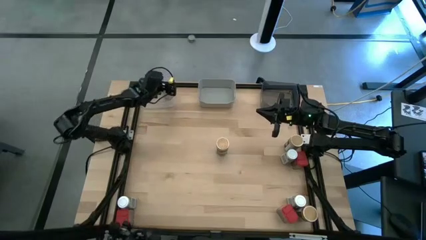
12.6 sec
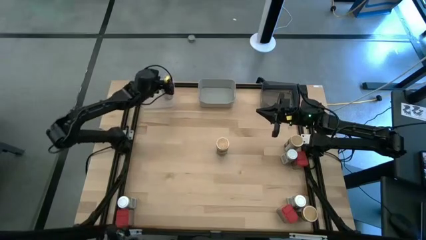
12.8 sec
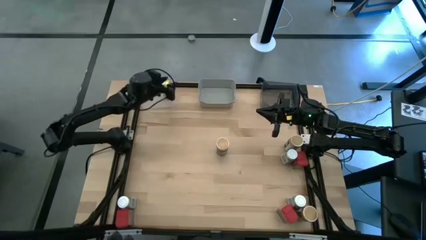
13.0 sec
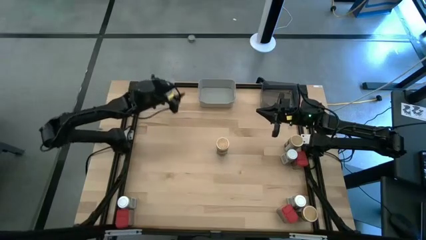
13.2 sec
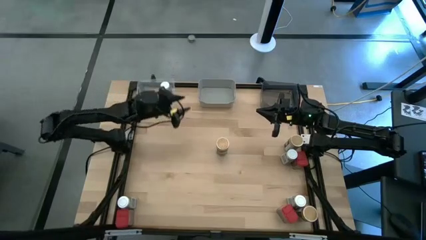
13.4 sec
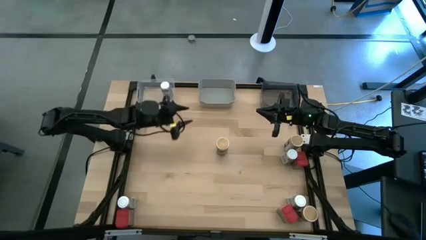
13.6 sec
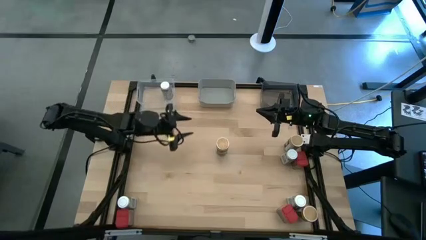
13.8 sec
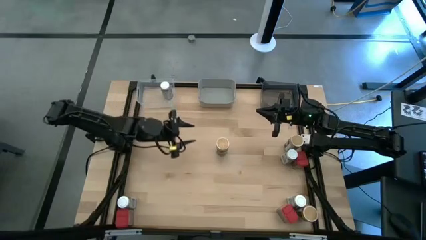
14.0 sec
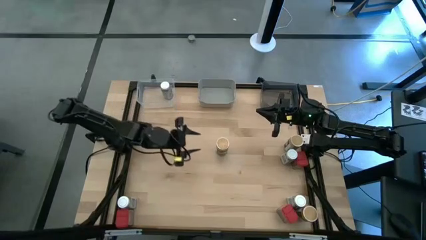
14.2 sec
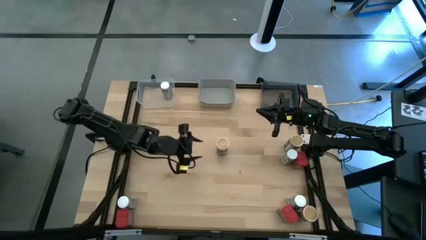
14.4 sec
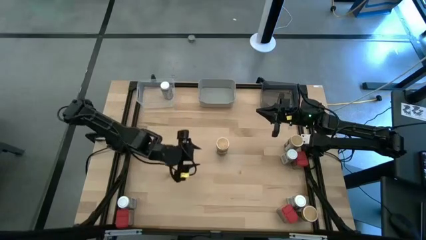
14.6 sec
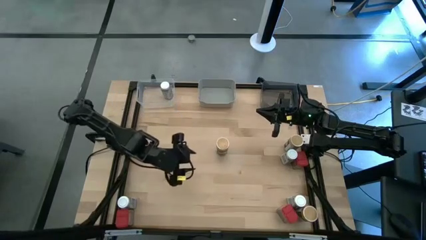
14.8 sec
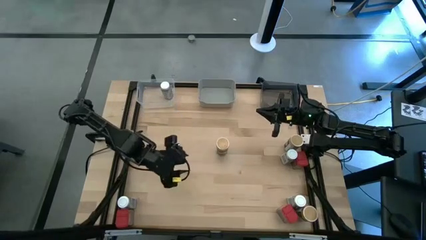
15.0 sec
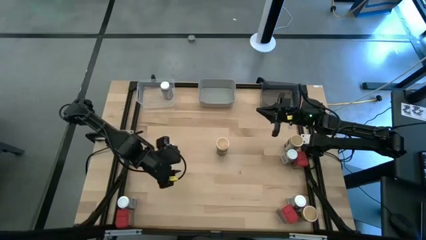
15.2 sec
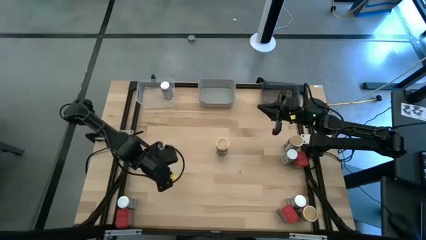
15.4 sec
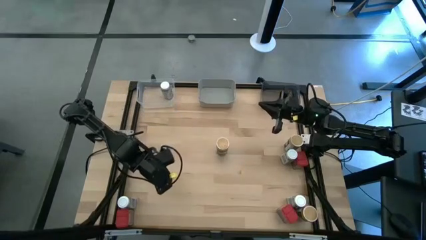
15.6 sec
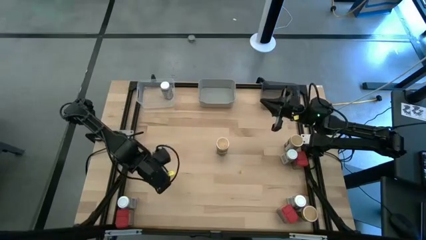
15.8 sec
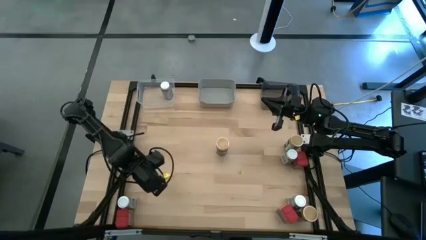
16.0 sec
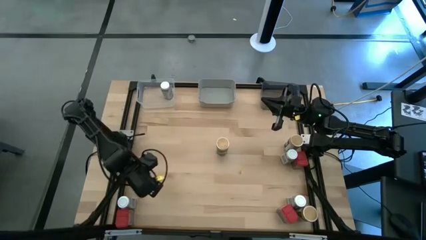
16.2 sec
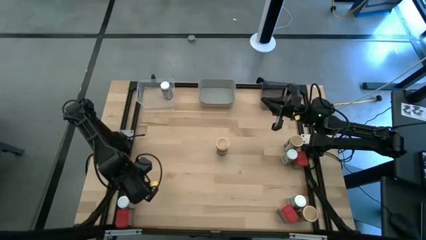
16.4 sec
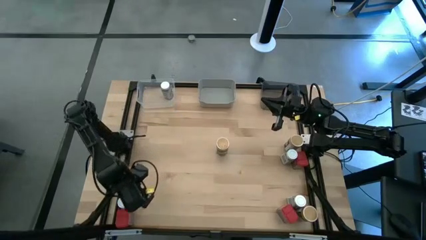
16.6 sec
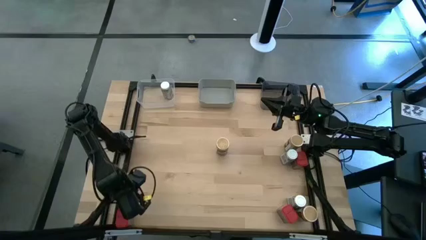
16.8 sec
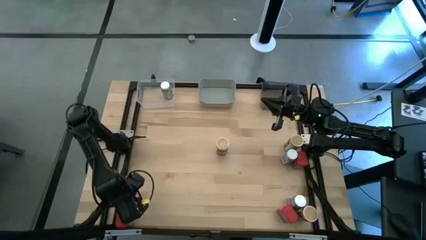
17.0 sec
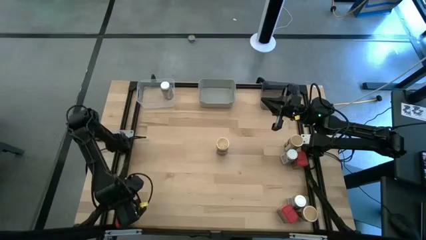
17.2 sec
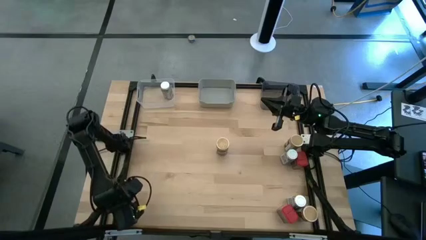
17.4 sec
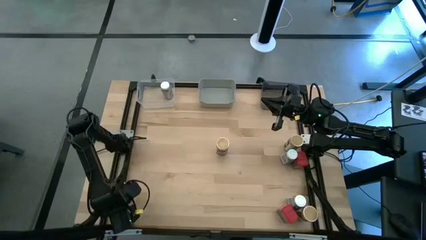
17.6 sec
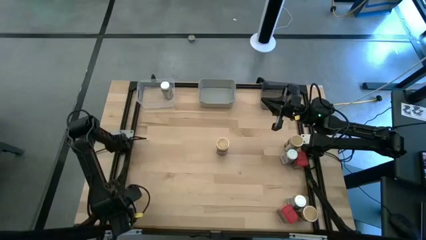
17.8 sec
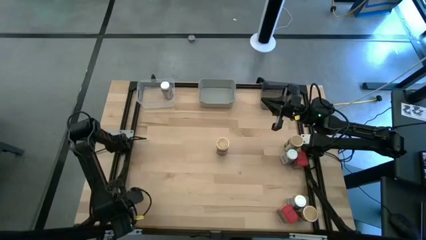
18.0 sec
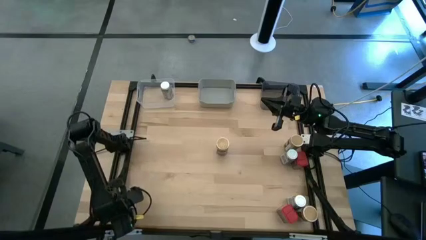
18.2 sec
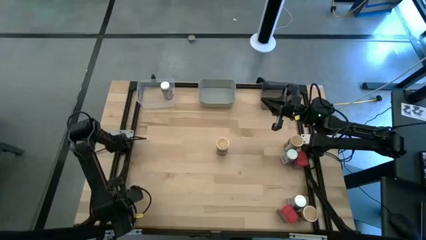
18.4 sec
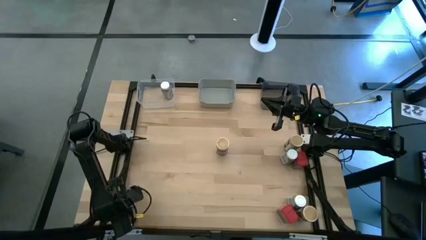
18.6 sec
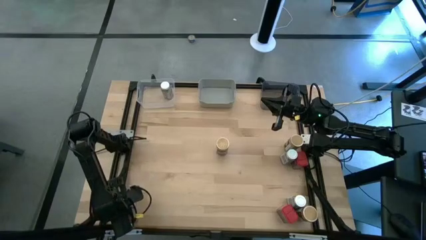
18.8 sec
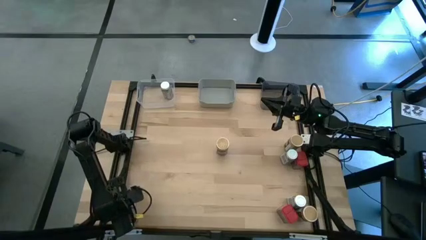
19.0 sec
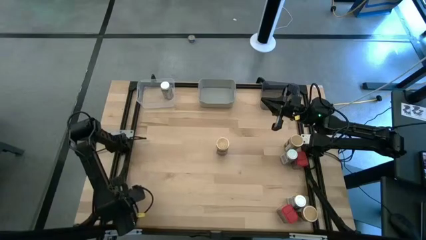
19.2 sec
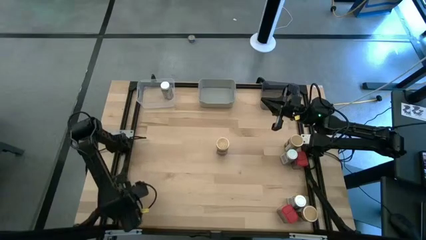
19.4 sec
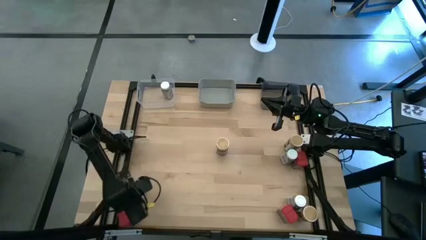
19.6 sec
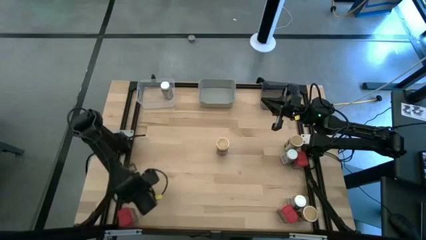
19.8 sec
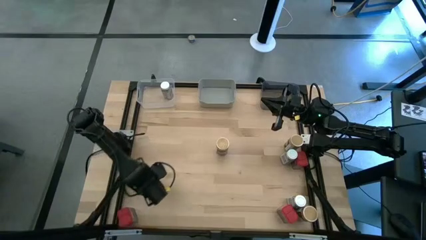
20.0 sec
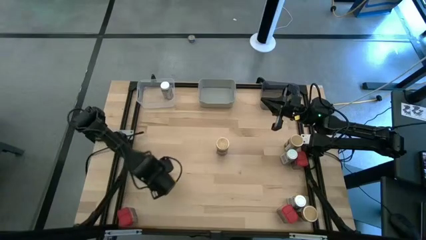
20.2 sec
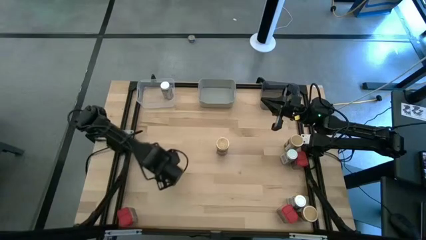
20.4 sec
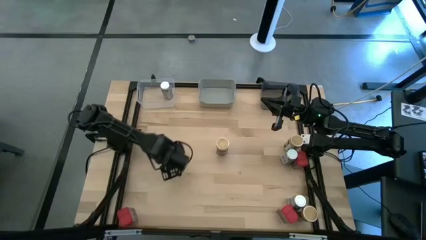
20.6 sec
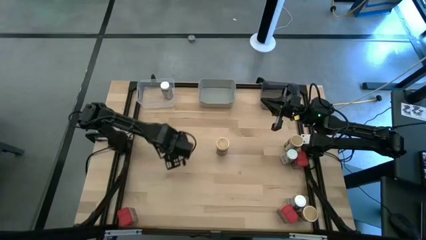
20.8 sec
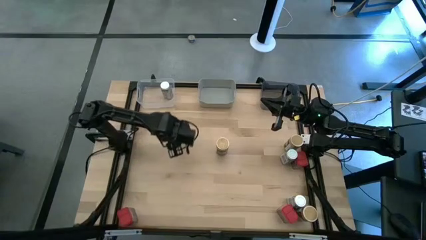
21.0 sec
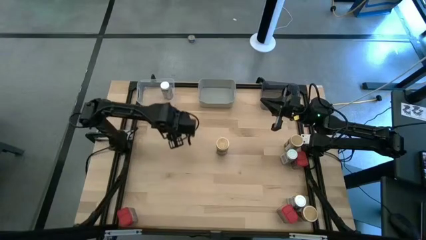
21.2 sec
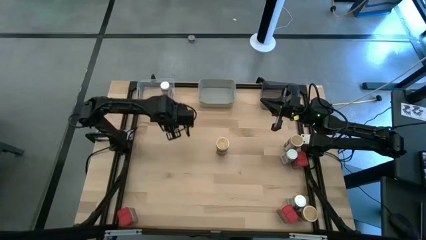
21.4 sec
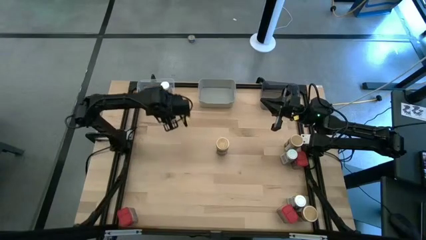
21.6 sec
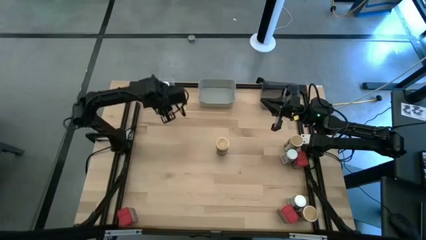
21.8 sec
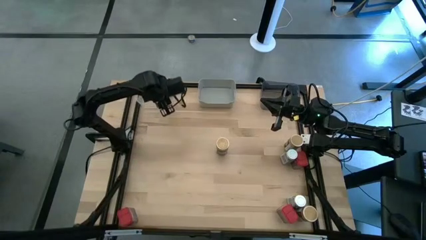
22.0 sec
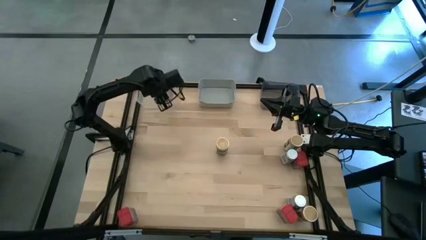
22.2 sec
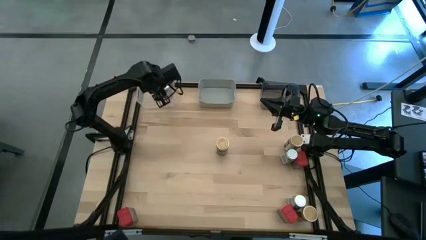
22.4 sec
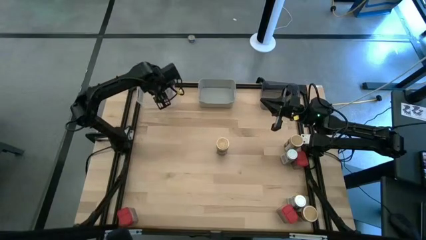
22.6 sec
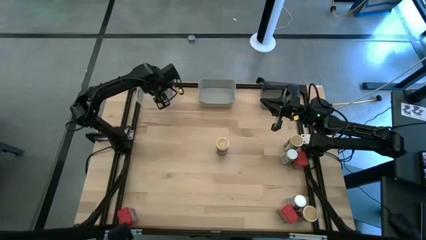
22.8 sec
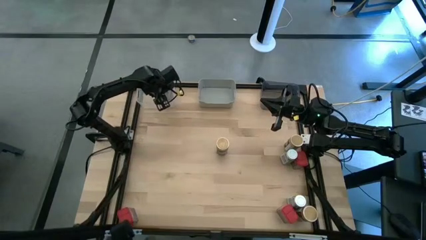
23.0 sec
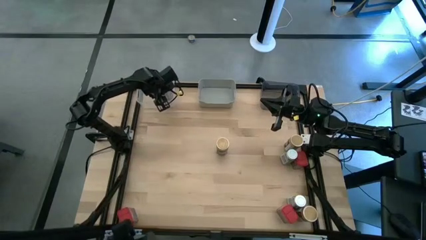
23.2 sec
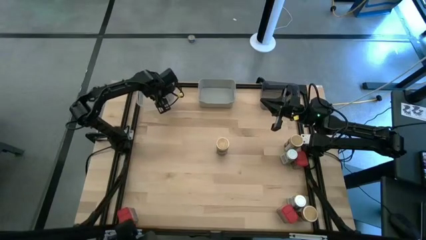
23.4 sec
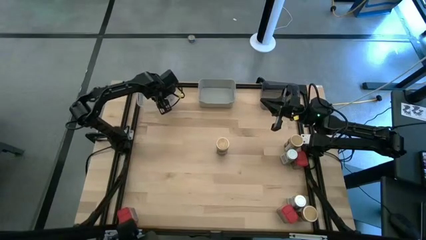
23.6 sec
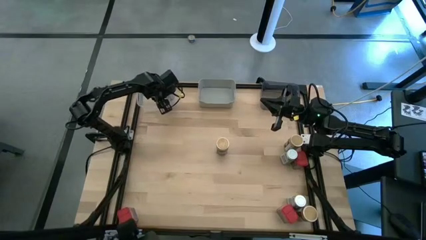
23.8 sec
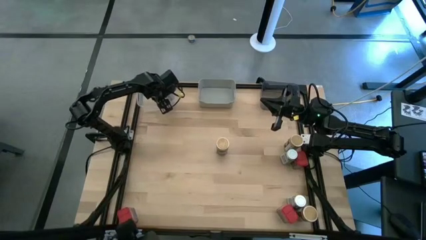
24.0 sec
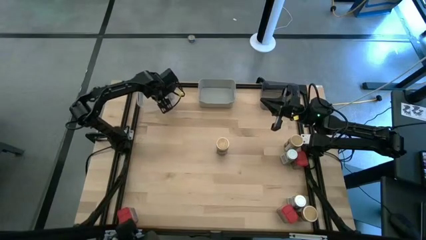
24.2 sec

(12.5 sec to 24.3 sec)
Task: Sort spices by type
Put the white seasoning bottle into the transparent bin

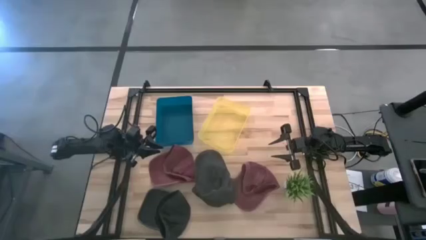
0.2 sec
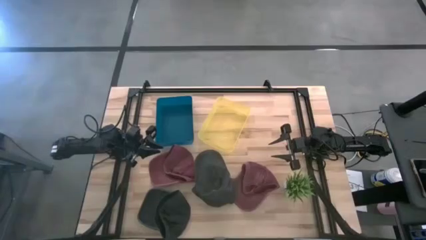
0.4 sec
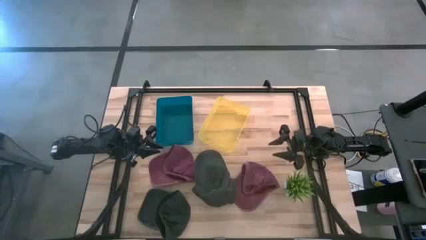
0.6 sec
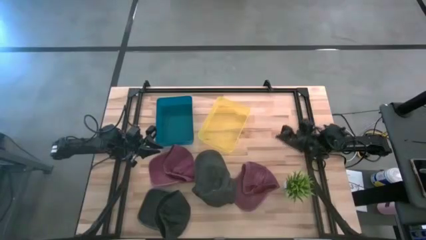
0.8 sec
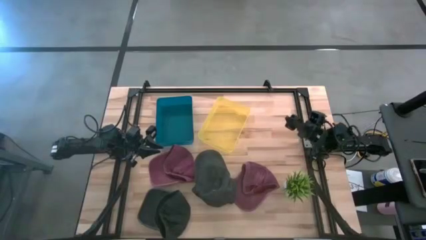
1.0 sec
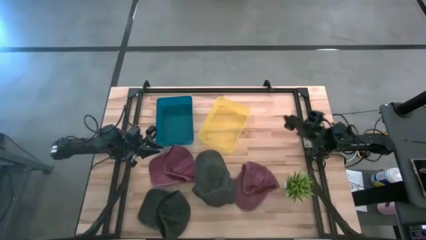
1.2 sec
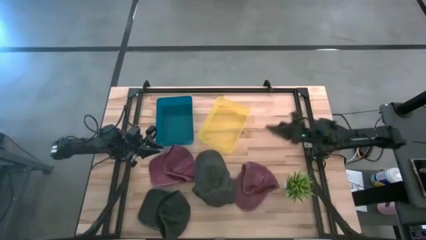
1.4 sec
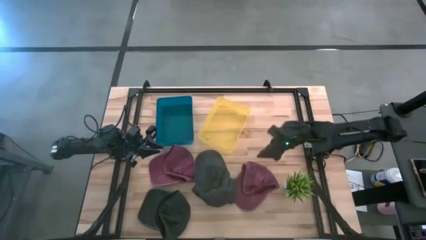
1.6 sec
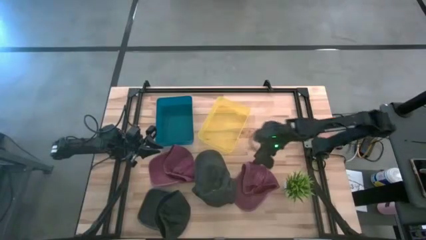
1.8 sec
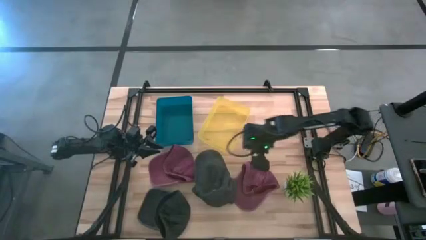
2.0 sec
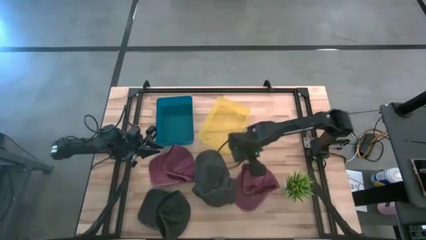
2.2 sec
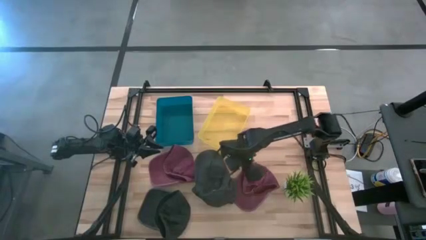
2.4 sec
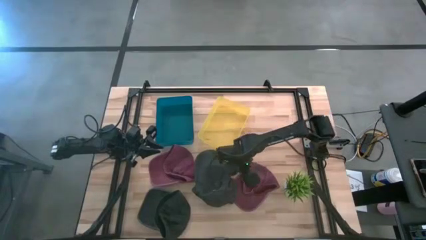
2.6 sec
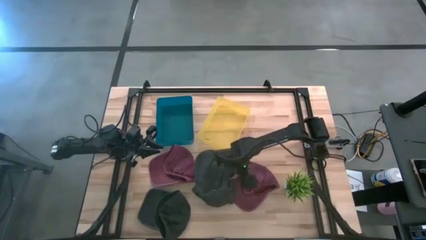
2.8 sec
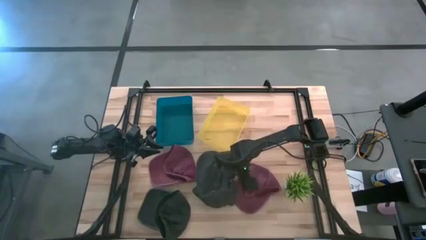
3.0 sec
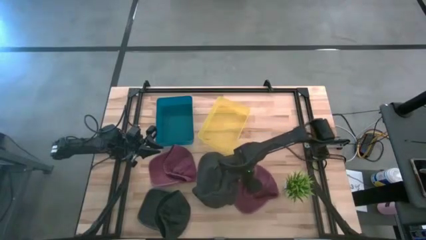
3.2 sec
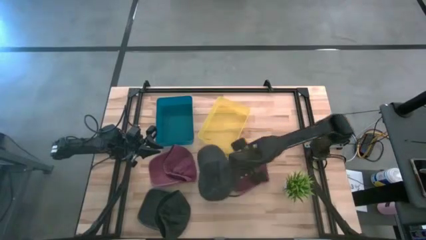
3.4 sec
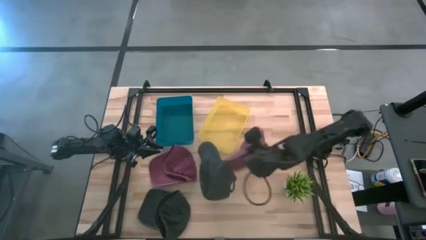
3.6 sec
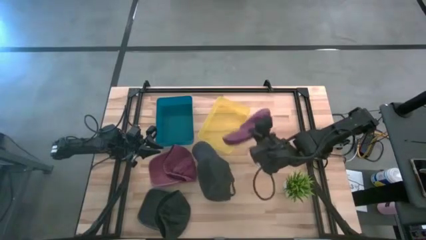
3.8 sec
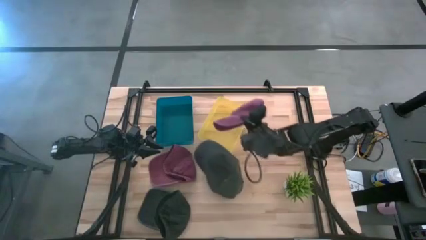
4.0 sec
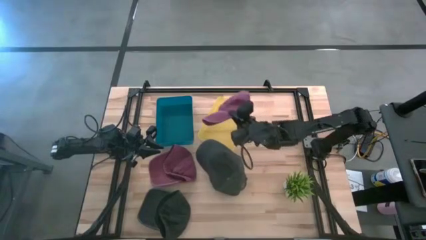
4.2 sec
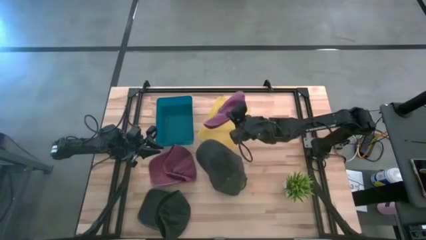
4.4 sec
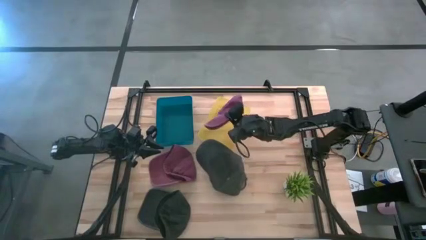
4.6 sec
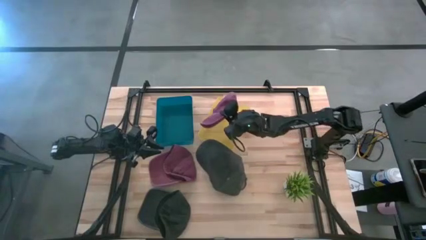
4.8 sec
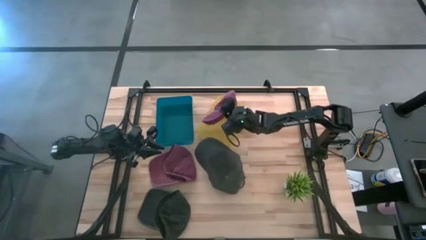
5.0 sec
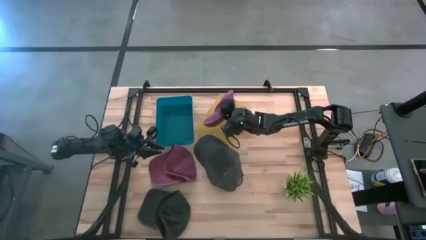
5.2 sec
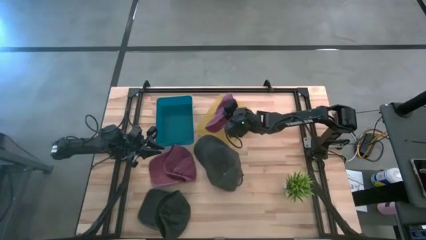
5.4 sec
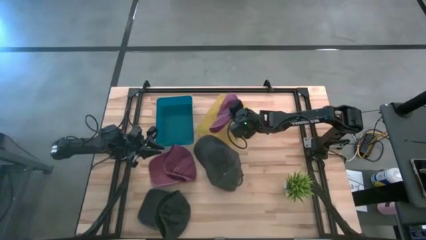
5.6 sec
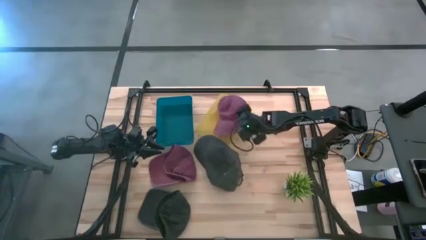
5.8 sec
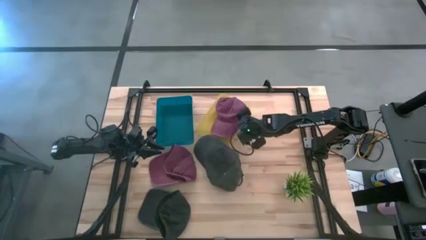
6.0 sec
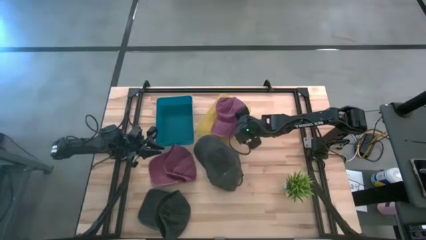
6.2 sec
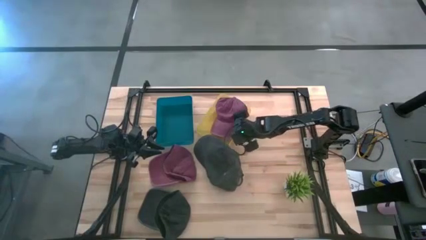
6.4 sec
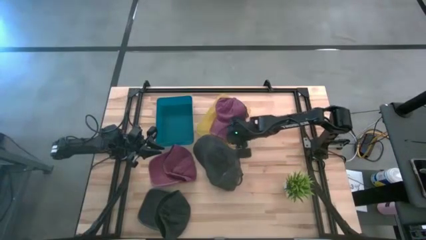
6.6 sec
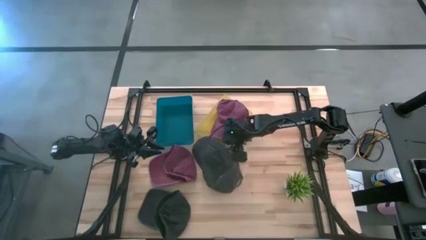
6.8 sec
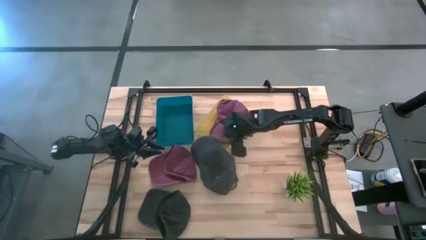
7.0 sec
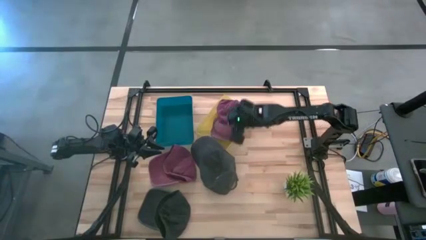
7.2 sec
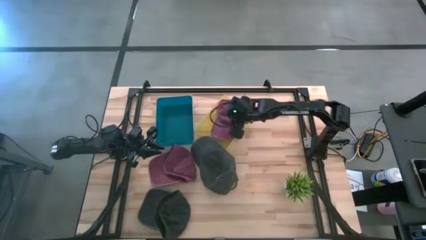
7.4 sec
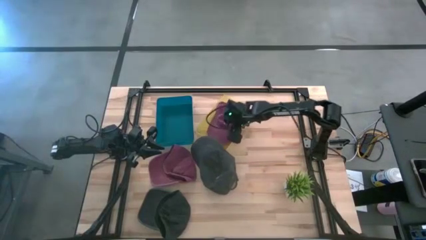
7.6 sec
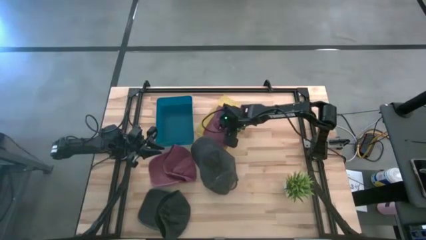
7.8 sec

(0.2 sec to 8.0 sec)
Task: Pick & Place hat
Put the right dark red cap into the yellow bin
